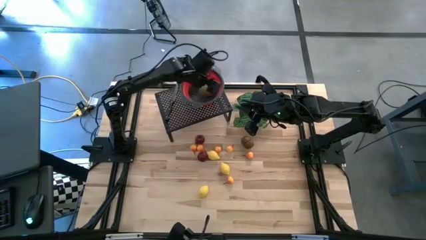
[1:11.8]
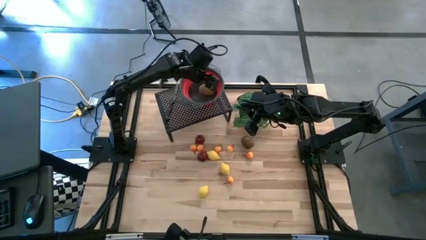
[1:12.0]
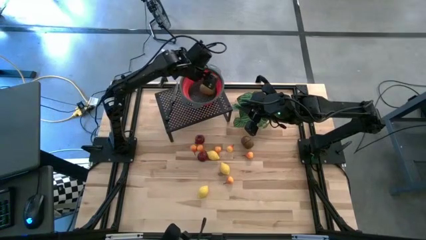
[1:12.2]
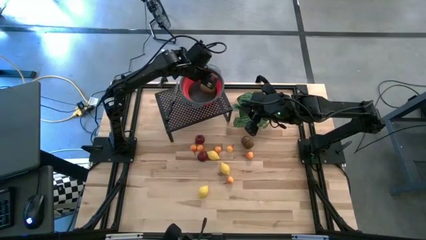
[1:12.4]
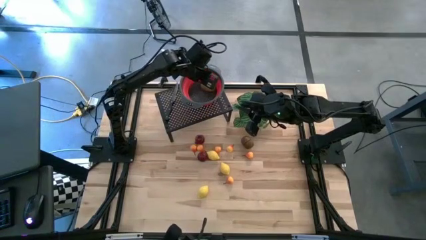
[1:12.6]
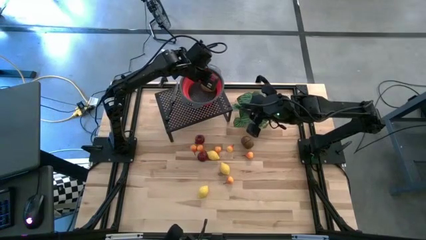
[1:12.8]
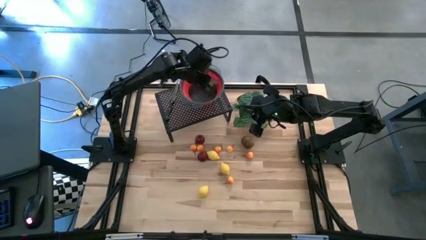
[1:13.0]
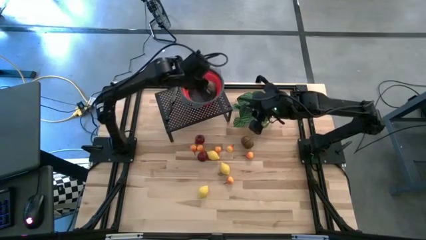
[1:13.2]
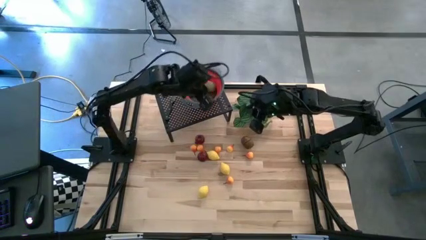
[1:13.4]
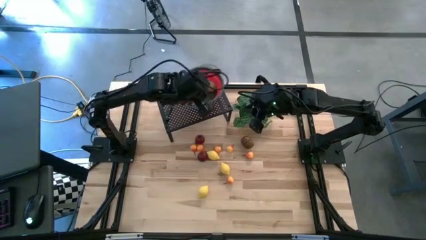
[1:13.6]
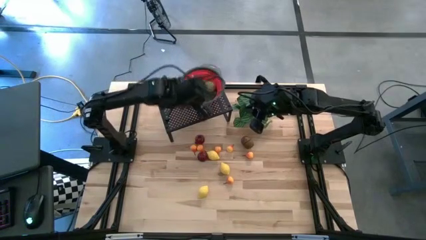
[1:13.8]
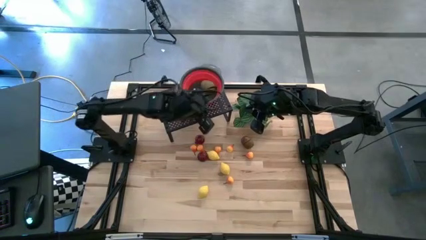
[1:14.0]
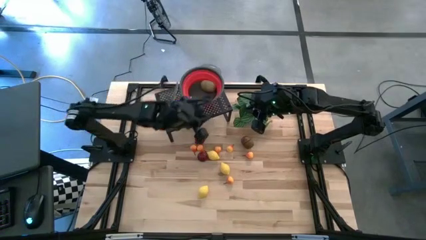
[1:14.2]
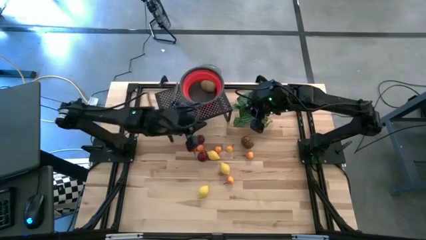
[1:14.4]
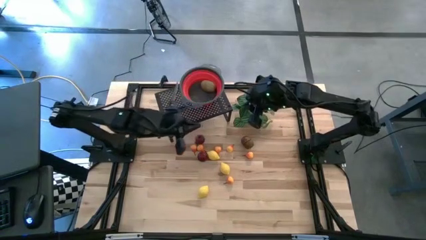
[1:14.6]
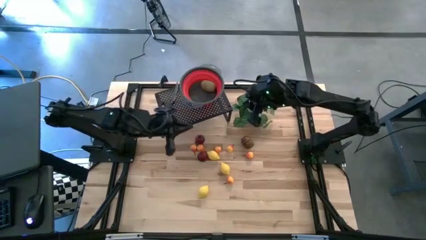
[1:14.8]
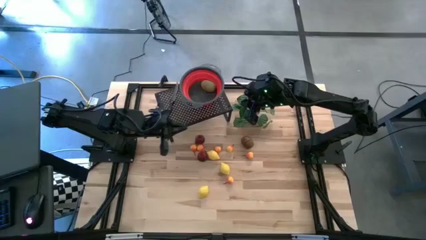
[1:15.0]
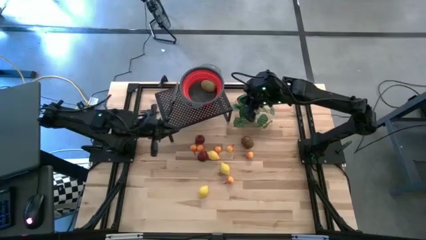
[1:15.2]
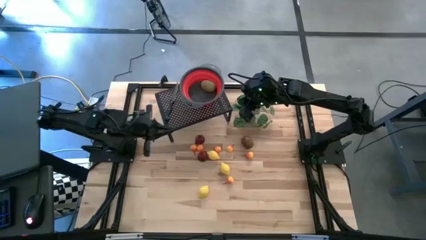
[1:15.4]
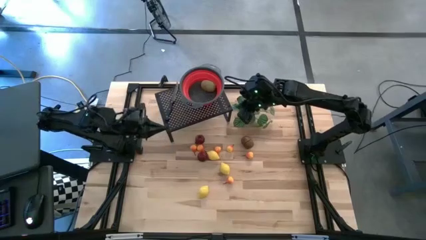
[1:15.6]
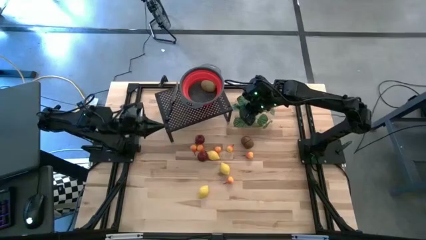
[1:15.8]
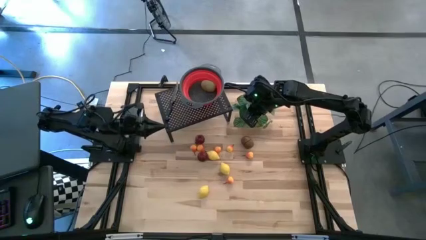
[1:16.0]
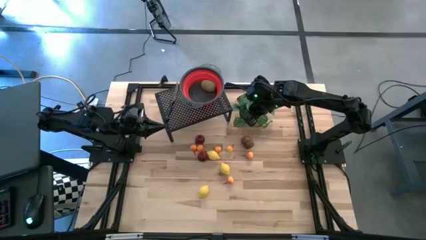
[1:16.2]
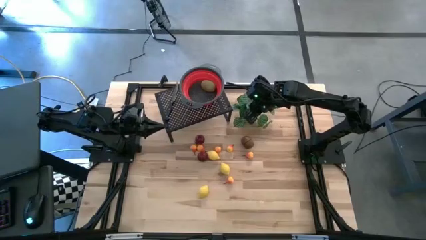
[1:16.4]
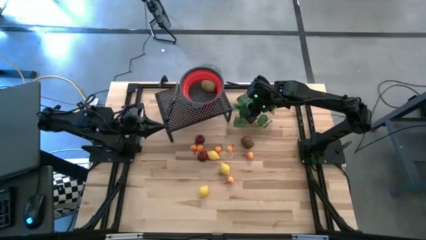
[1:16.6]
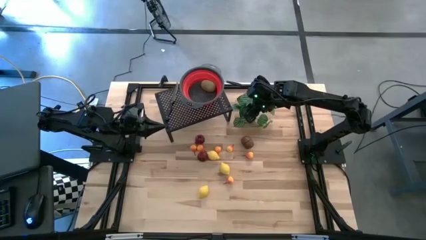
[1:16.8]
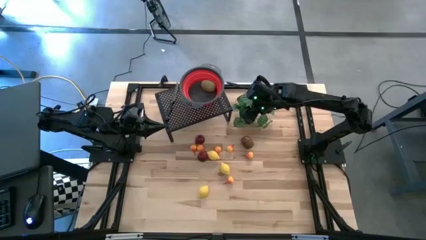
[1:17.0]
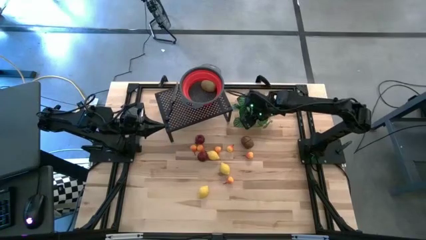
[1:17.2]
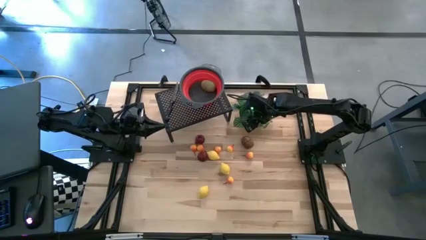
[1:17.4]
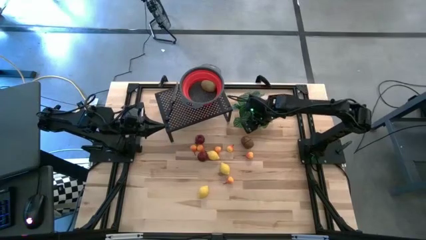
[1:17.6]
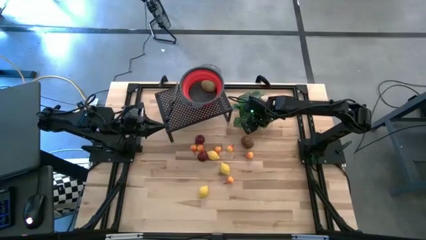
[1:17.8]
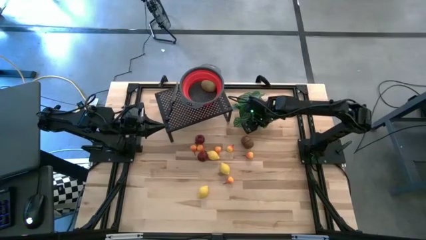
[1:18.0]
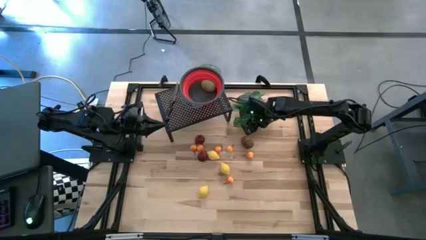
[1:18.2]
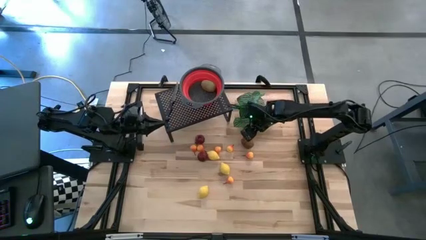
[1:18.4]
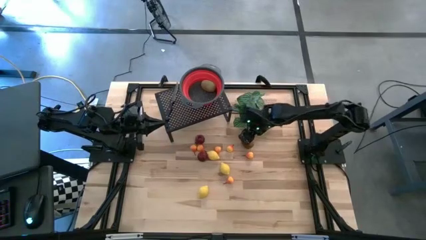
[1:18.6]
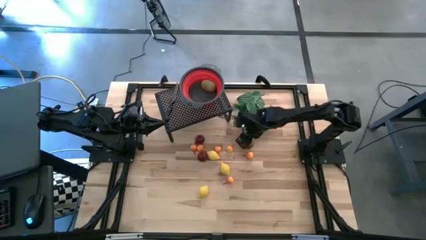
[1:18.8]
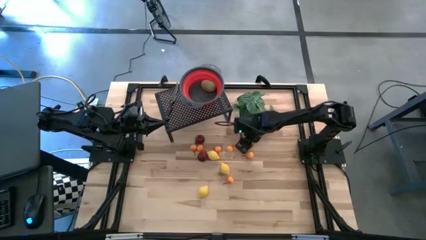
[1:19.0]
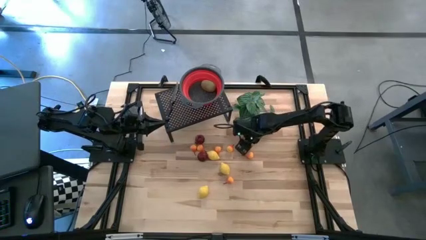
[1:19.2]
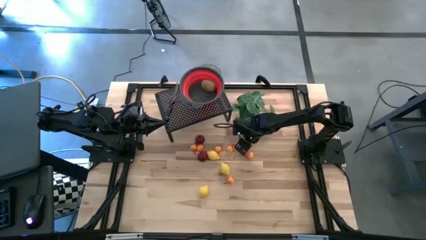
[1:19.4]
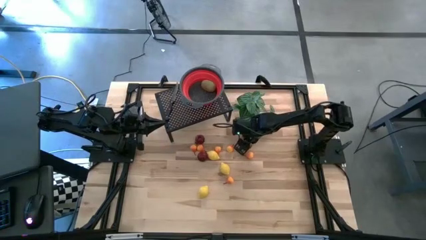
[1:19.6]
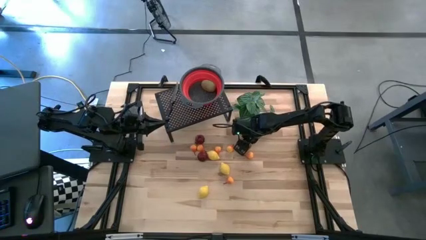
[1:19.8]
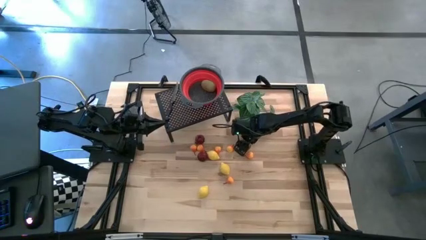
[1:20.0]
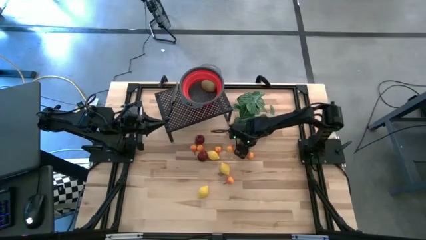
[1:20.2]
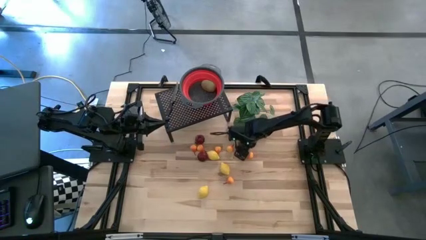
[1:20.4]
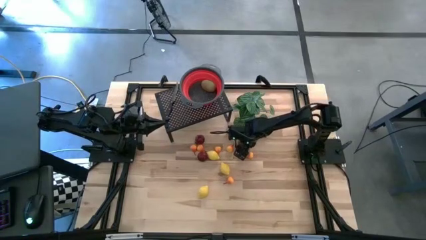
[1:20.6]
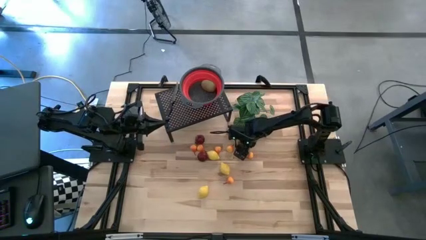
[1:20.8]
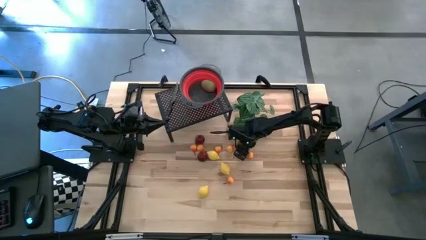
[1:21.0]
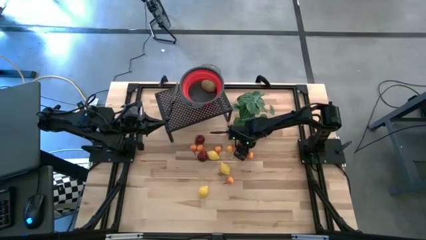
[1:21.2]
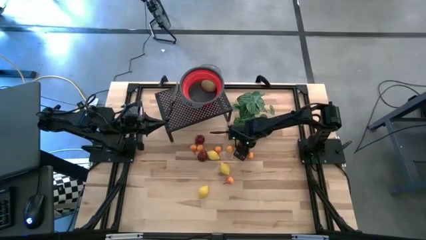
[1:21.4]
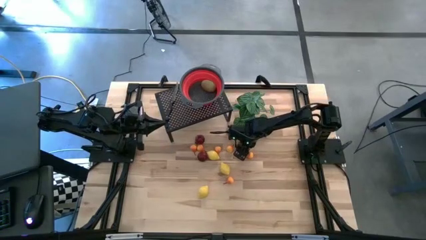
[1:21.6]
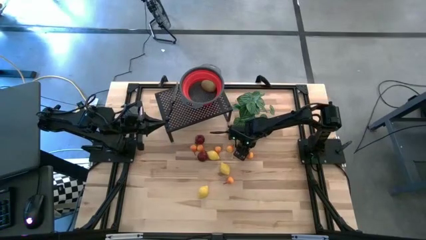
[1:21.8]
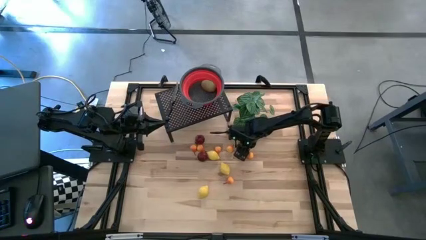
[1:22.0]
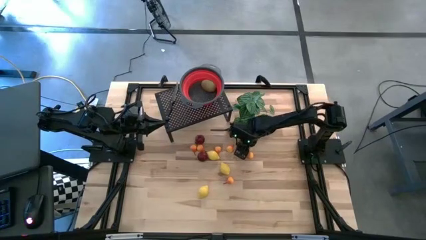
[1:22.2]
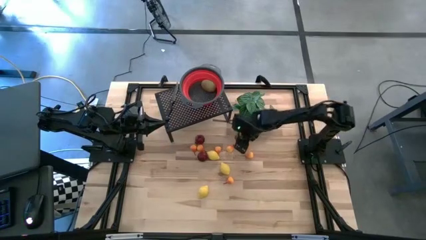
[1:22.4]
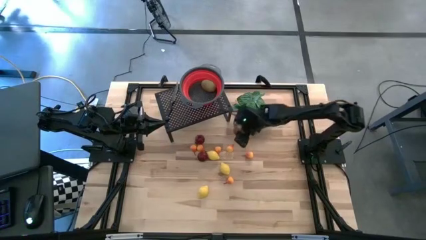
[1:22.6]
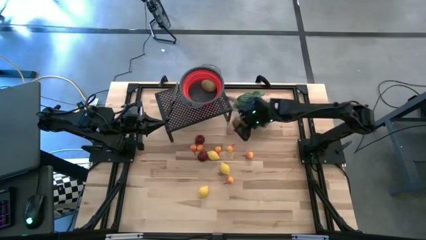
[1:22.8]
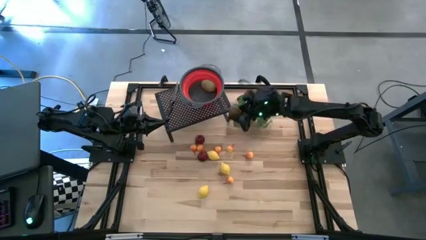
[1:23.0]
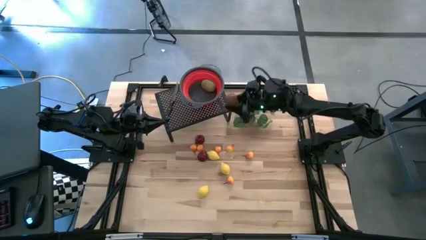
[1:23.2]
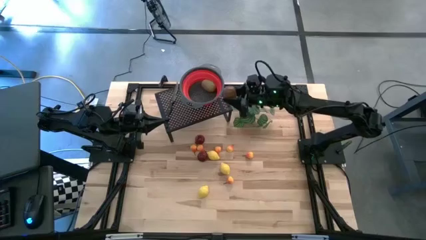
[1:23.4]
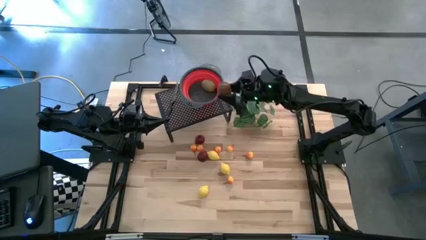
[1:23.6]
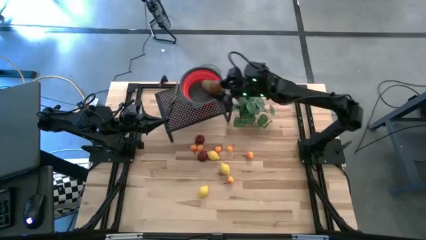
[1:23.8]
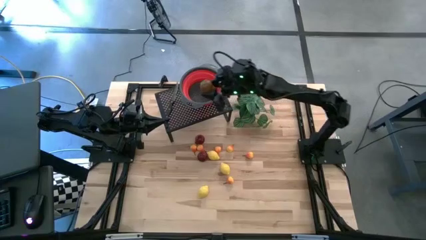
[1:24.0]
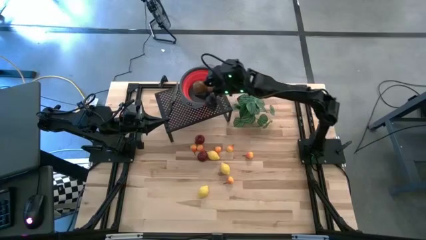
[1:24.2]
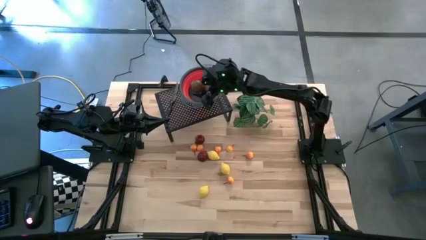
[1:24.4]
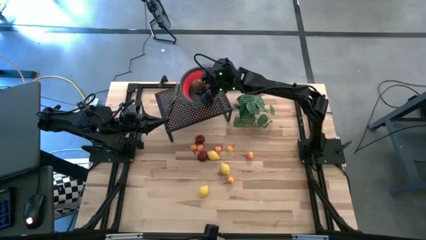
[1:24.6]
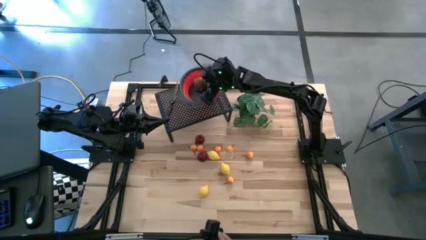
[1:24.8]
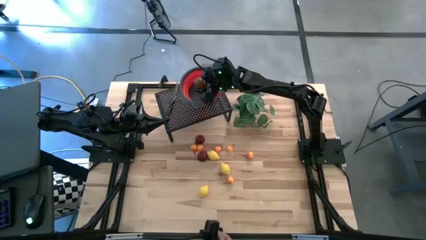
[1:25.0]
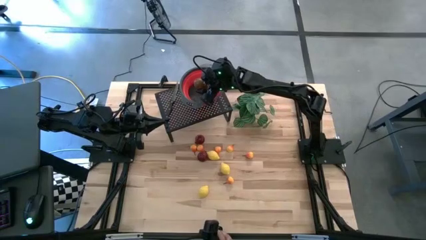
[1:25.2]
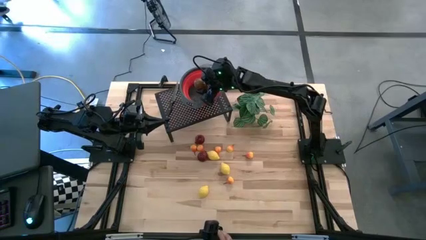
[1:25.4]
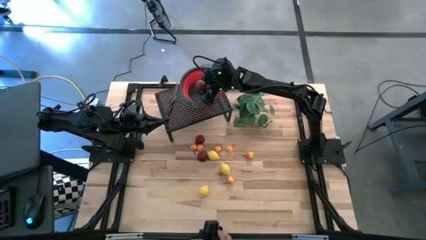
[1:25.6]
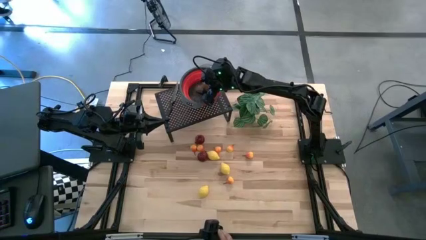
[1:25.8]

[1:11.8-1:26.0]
Task: Pick & Place Fruit
Put the green kiwi into the red basket on the shelf
